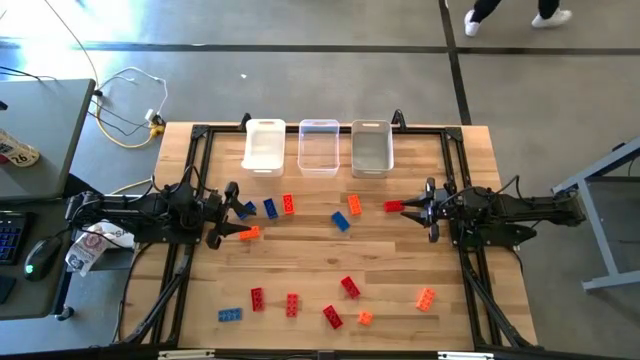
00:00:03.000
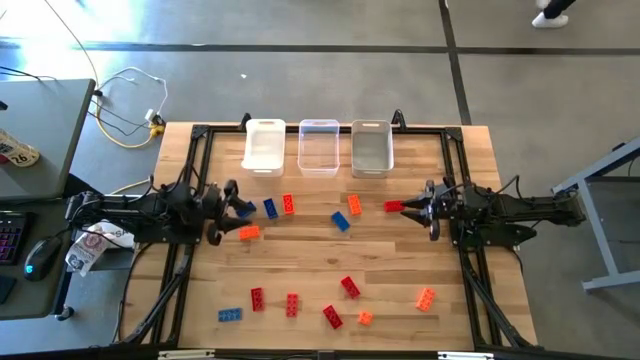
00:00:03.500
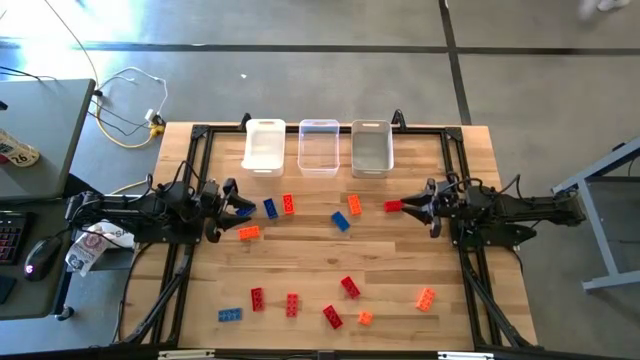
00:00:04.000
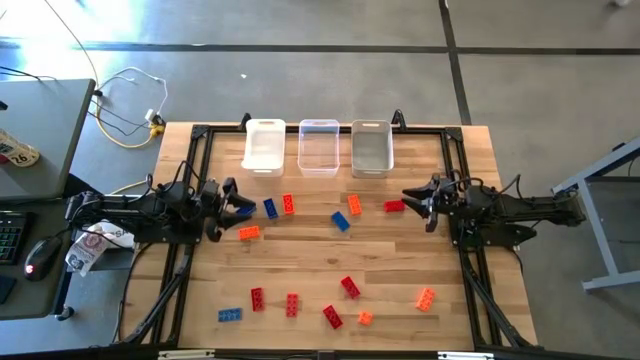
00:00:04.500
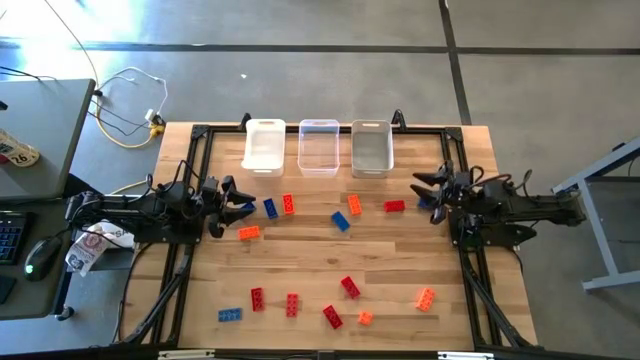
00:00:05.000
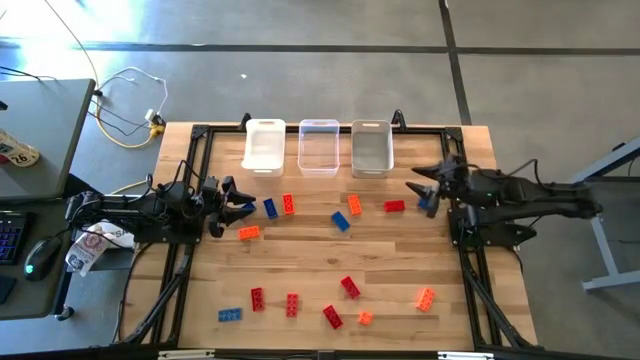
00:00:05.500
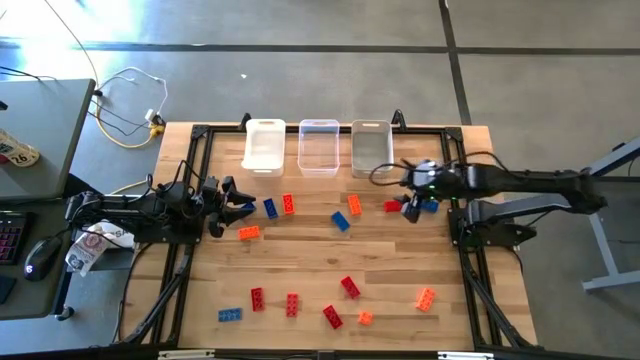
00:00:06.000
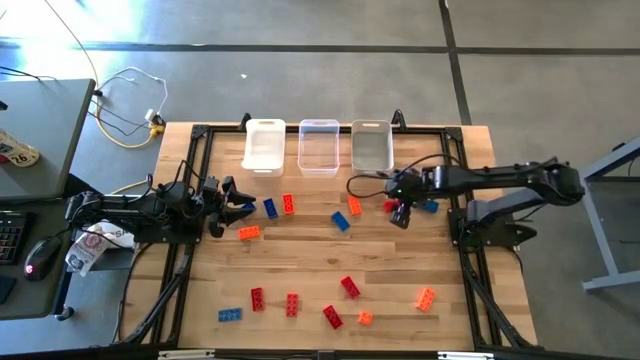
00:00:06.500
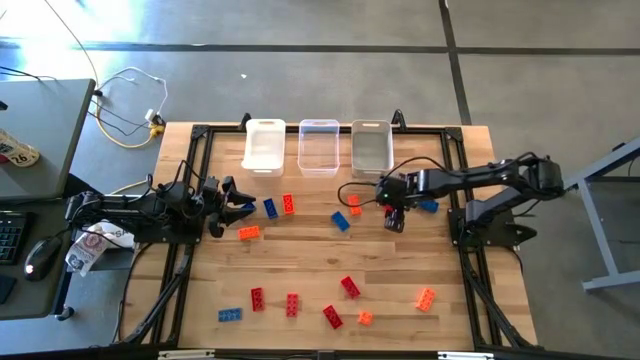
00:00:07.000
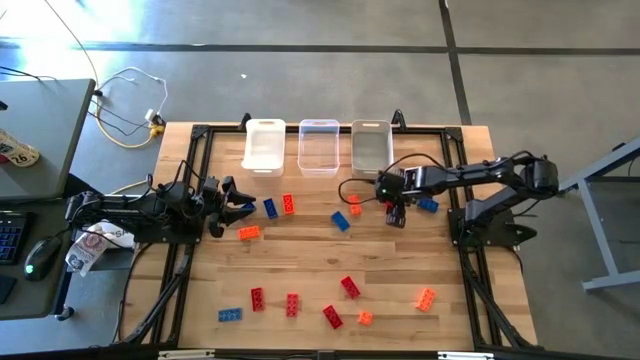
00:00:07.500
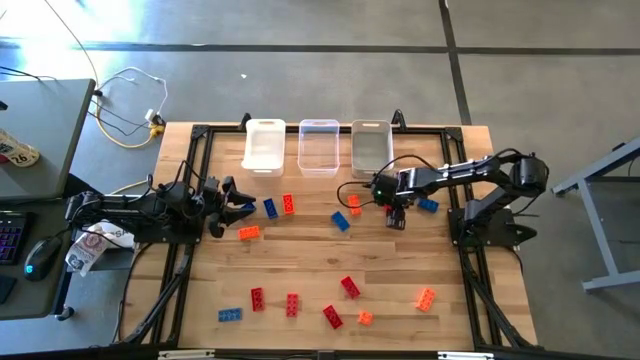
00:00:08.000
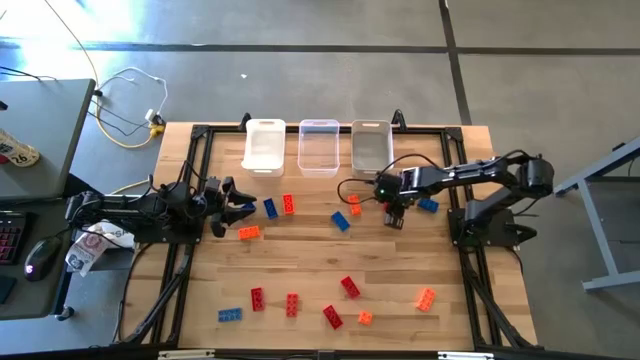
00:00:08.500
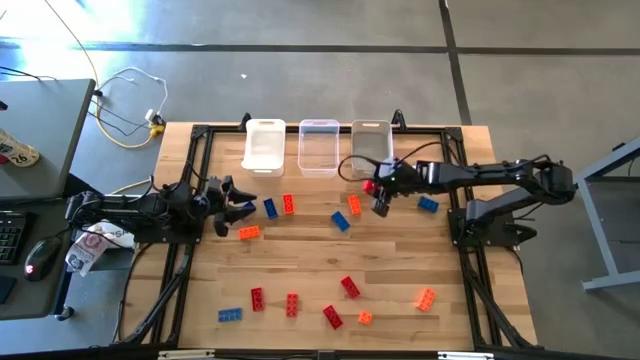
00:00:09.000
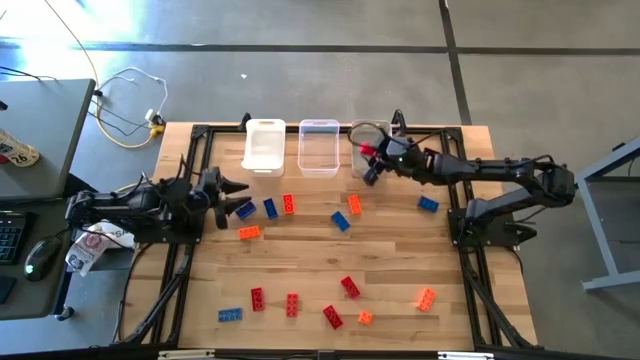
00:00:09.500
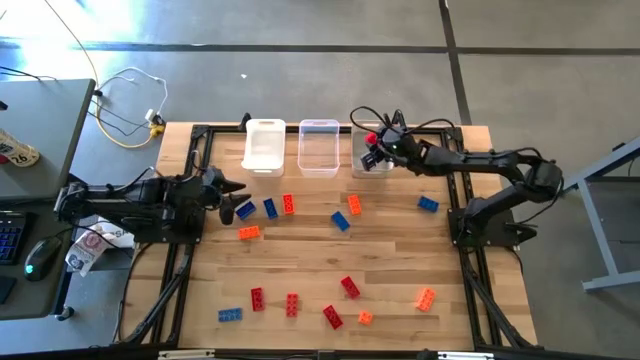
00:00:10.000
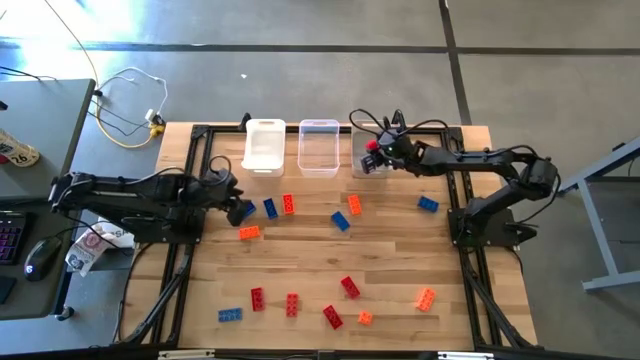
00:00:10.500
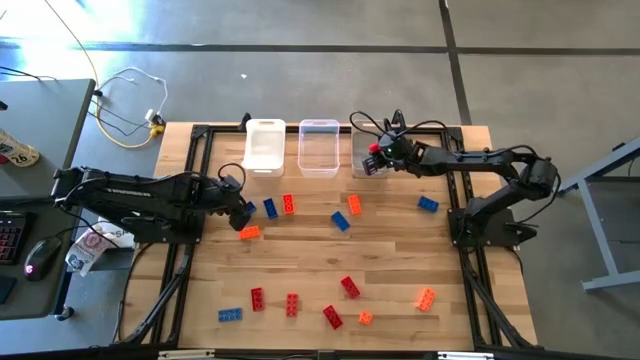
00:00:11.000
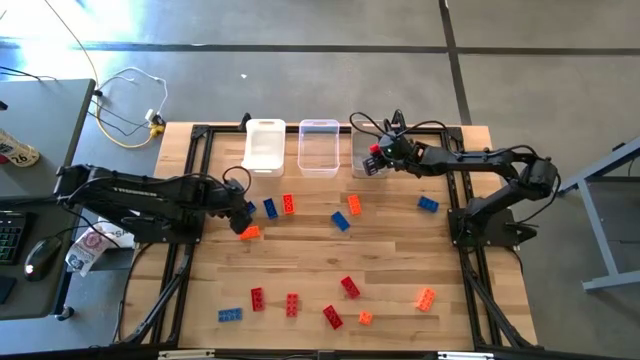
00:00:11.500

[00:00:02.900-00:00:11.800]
Task: Sort & place blocks by color
Put the red game piece into the gray bin

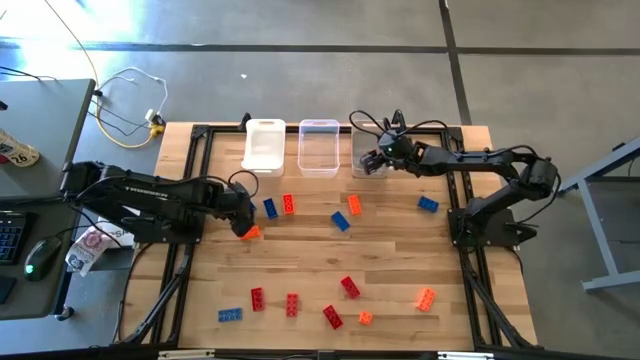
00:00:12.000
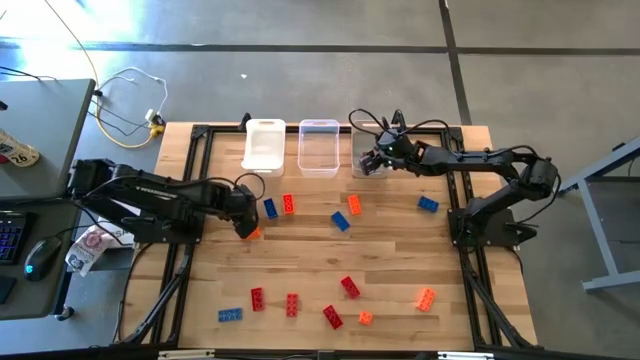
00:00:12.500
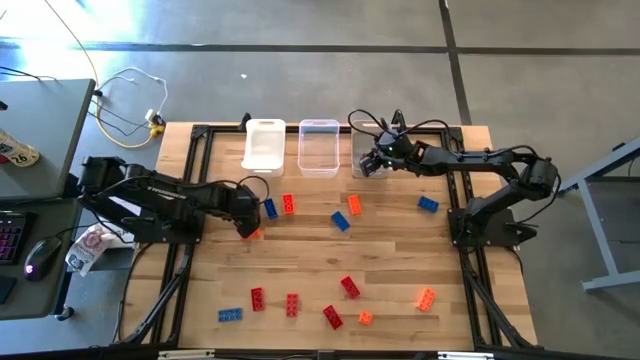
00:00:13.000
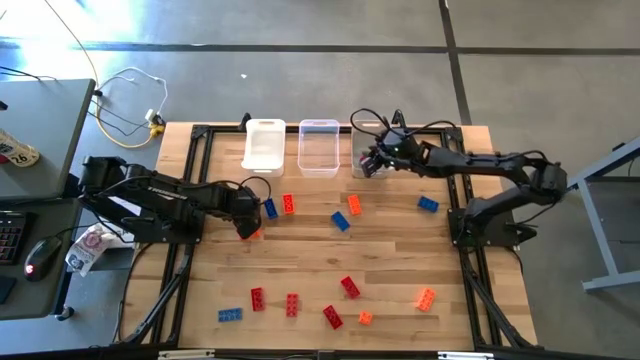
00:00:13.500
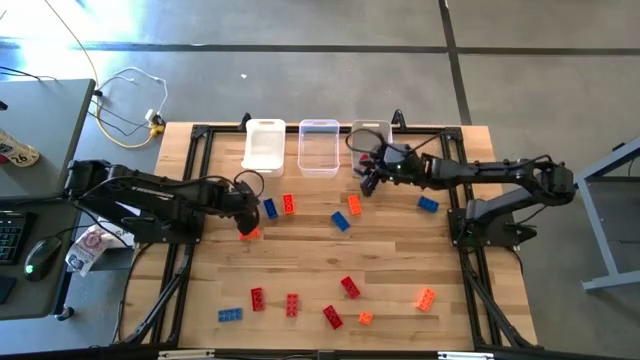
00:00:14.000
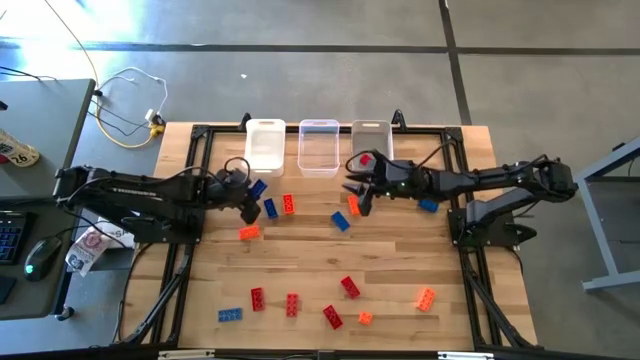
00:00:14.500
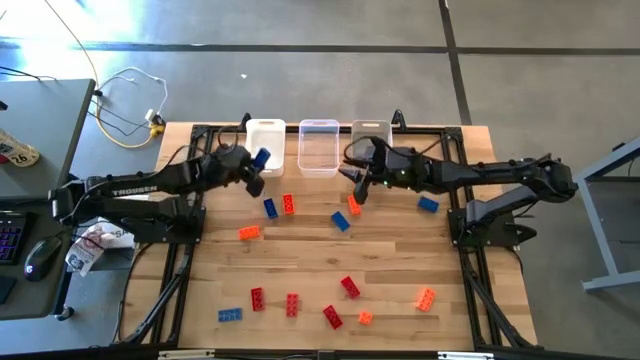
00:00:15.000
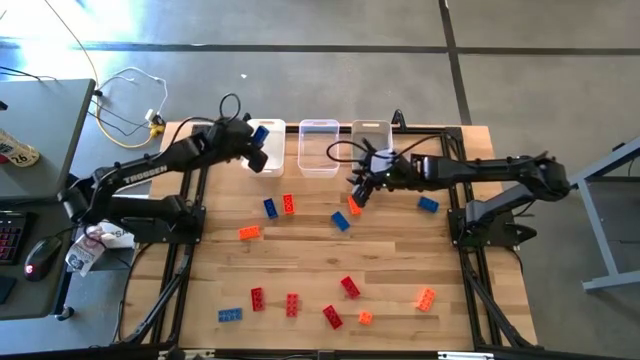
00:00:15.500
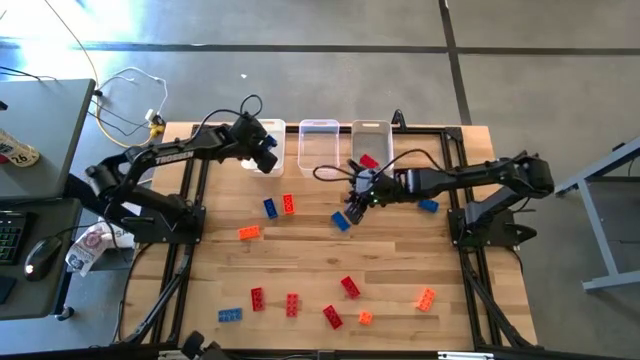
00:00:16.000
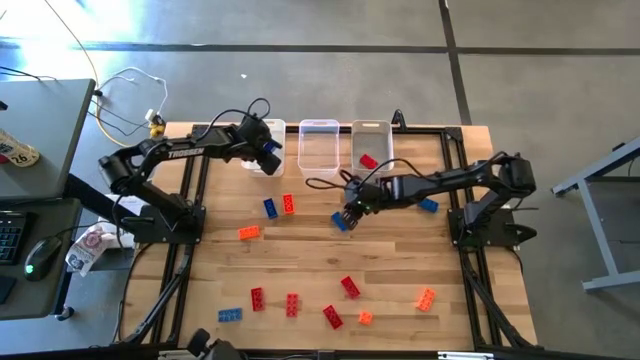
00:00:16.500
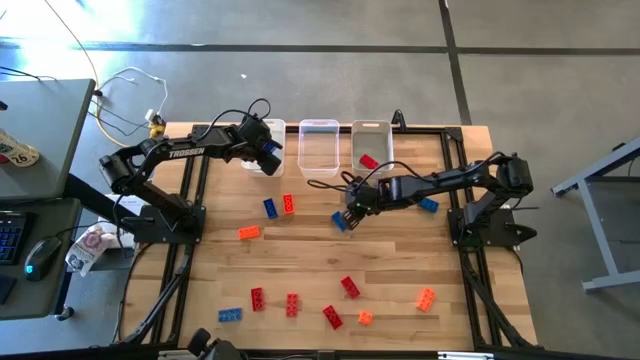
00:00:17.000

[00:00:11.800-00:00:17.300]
Put the blue game piece into the white bin

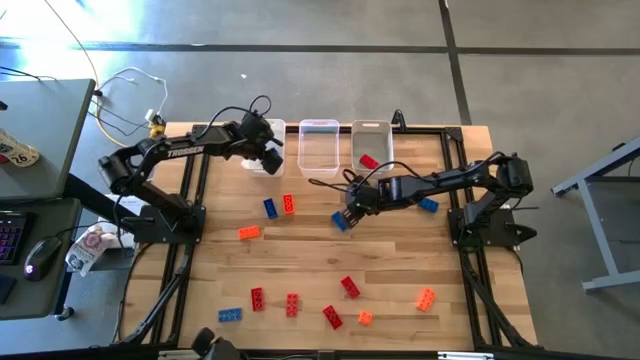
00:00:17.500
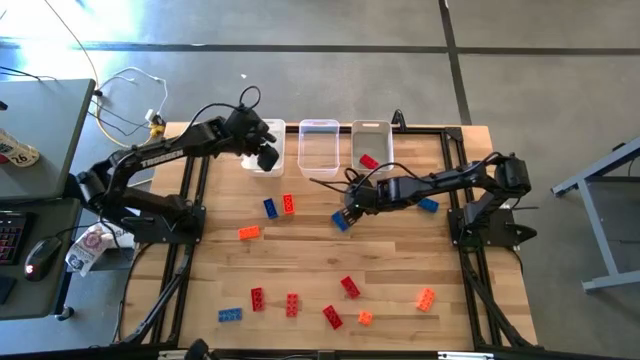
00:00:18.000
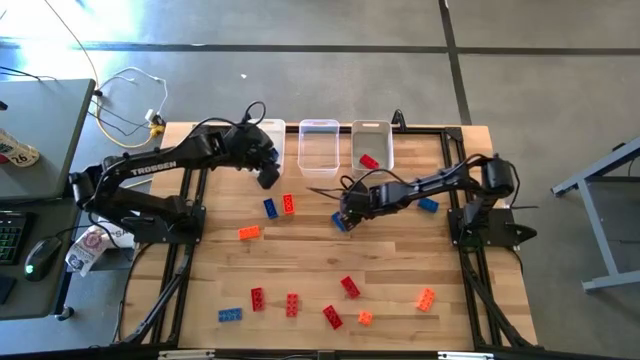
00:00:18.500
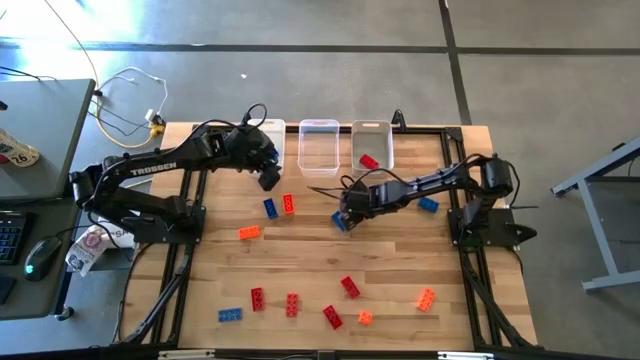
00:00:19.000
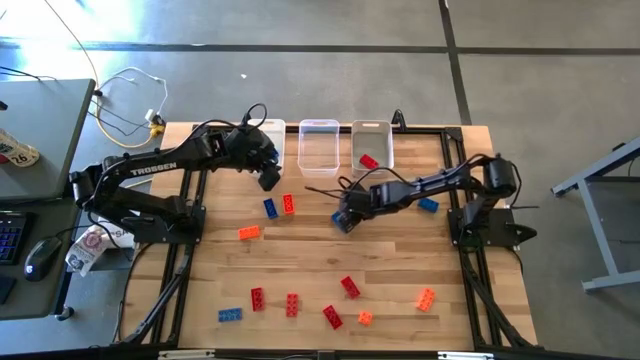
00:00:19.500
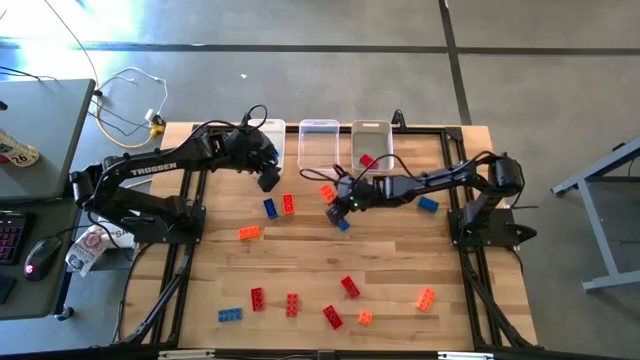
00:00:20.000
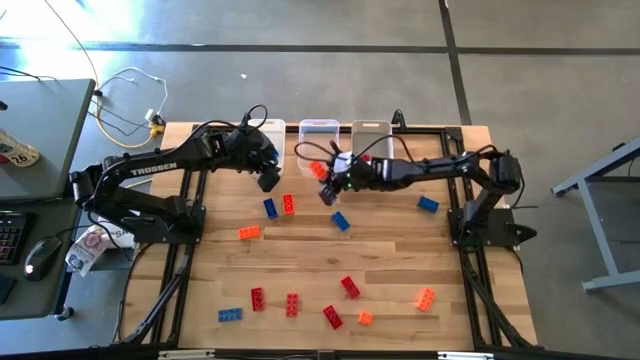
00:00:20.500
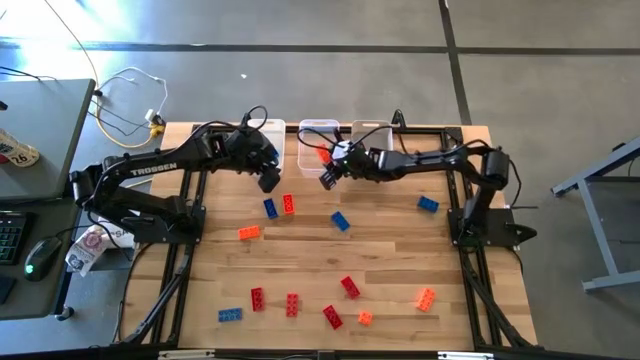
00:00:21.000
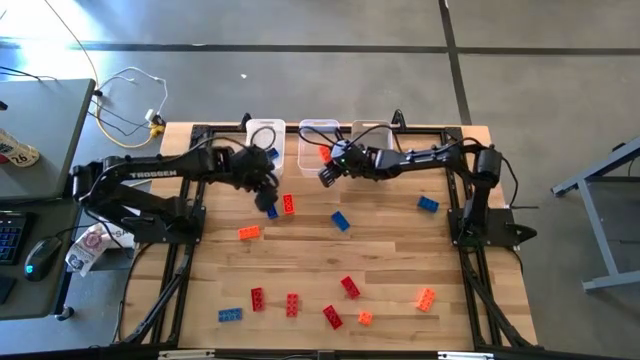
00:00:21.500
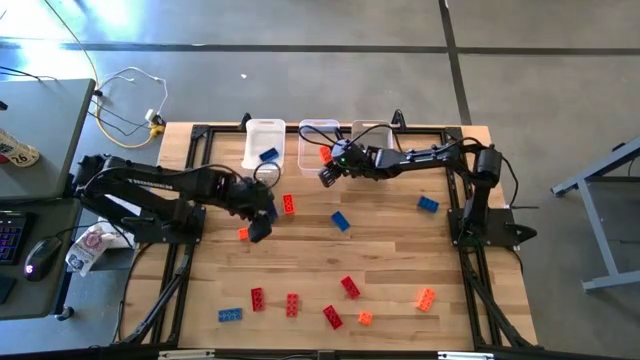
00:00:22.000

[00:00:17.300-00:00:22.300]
Put the orange game piece into the transparent bin

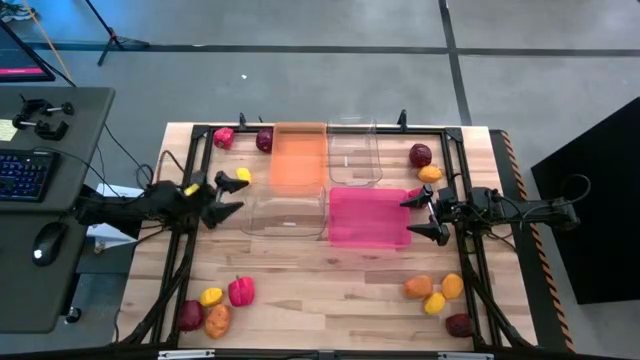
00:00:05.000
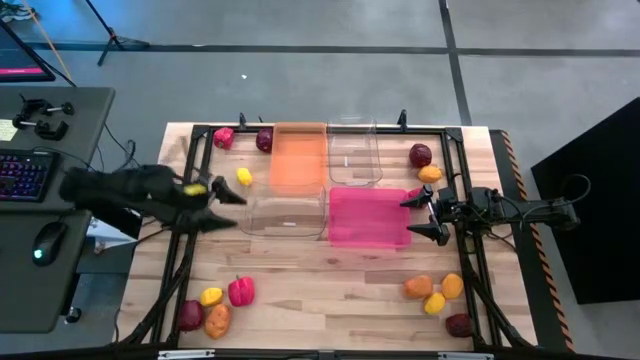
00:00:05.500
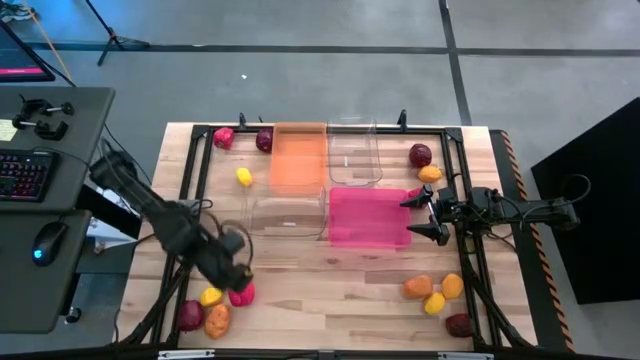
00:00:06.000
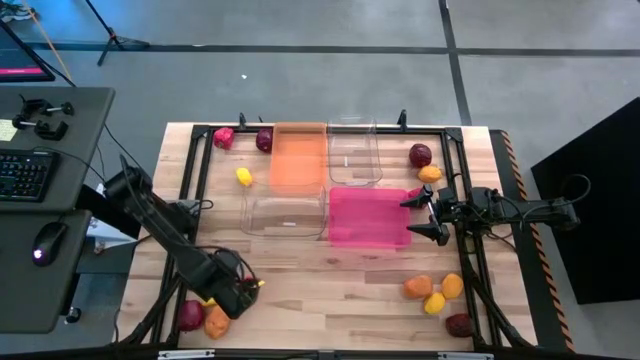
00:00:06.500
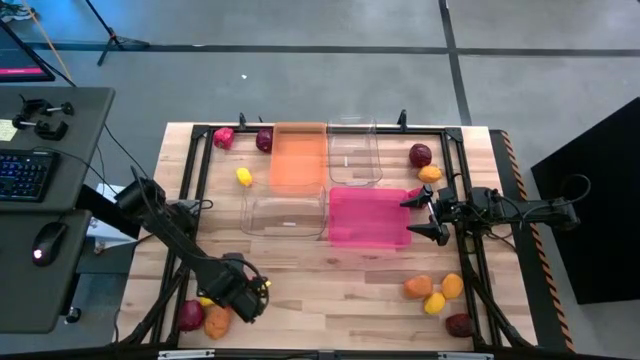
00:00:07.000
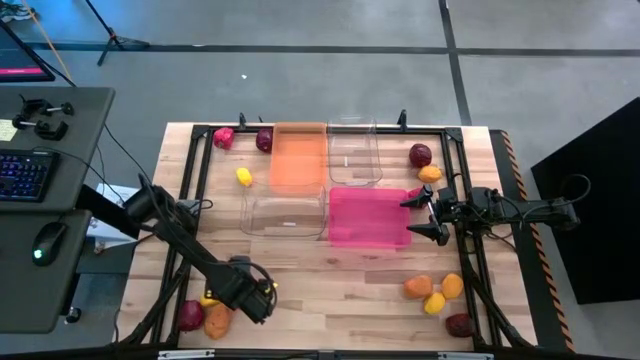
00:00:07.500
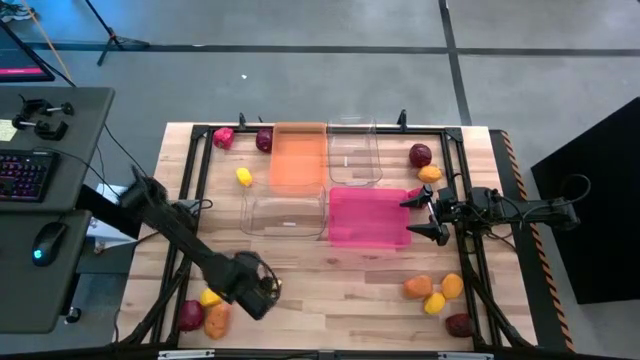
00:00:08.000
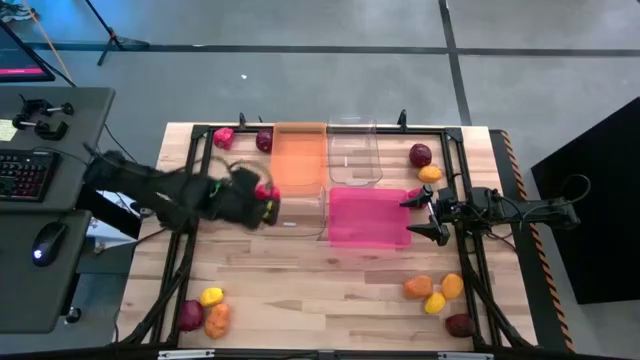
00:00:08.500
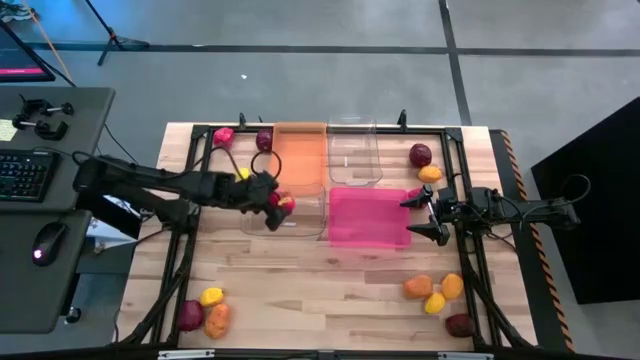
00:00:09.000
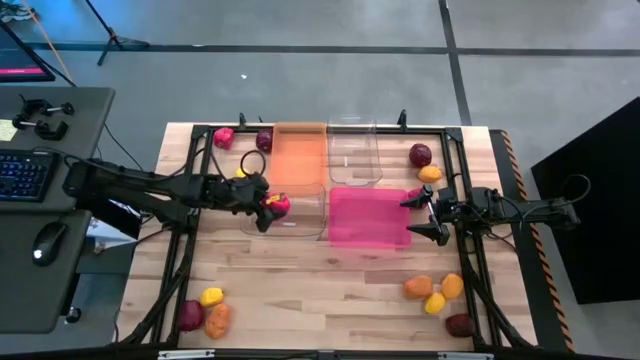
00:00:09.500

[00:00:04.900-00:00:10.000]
Task: Sort produce into baskets
Put the red bell pepper into the left transparent bin
